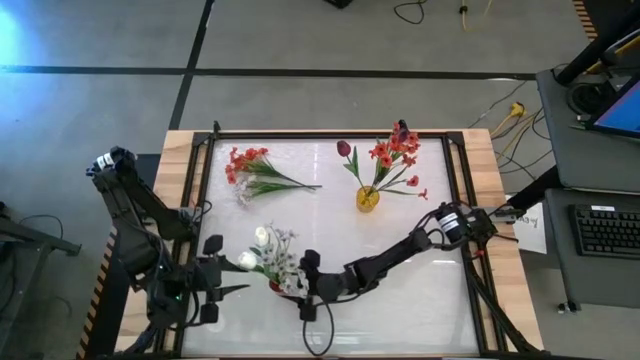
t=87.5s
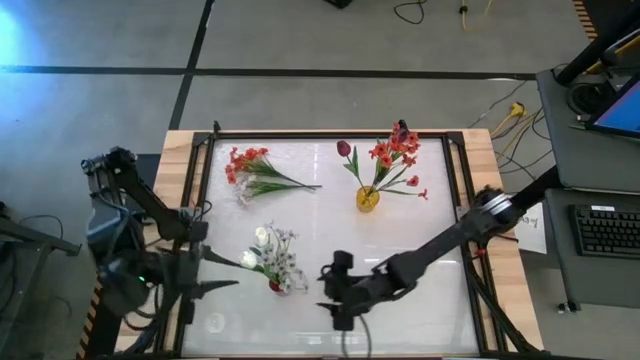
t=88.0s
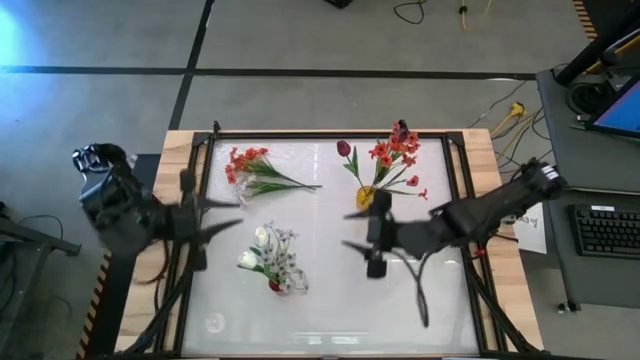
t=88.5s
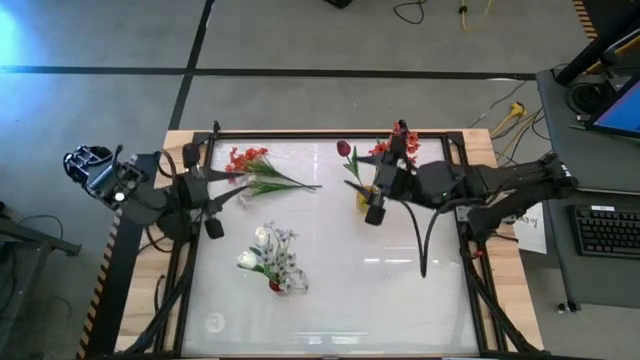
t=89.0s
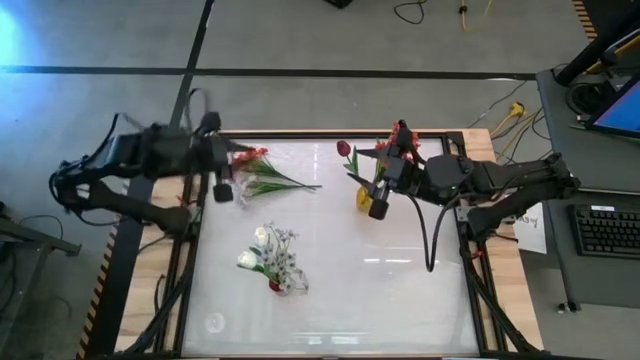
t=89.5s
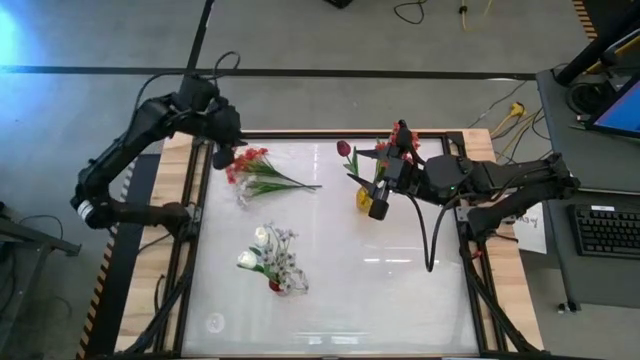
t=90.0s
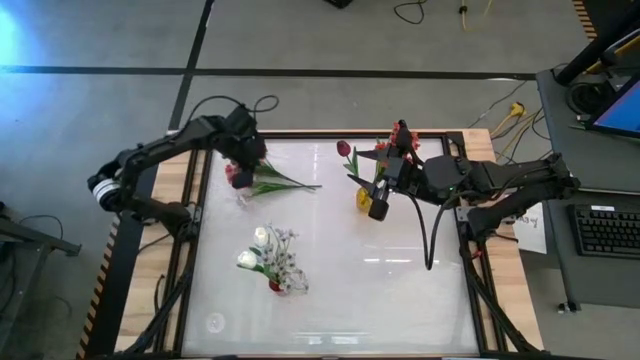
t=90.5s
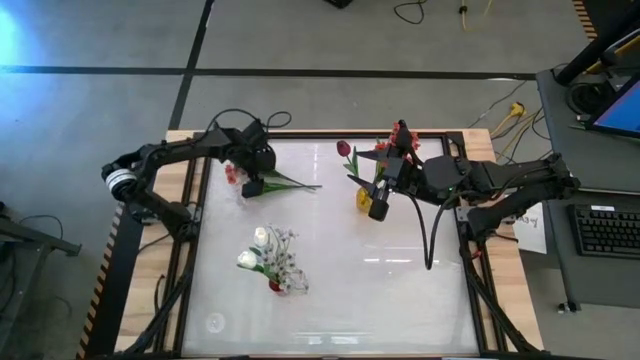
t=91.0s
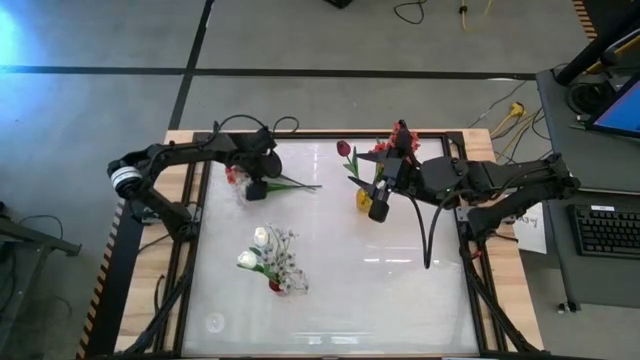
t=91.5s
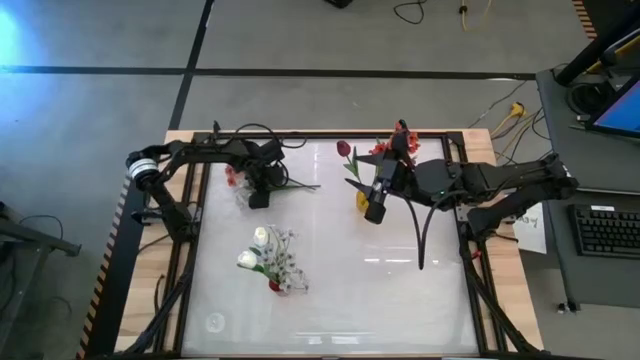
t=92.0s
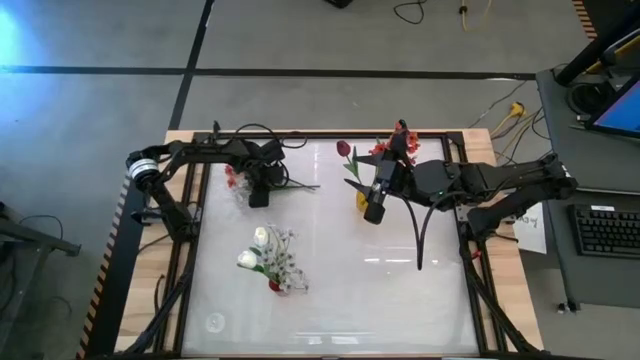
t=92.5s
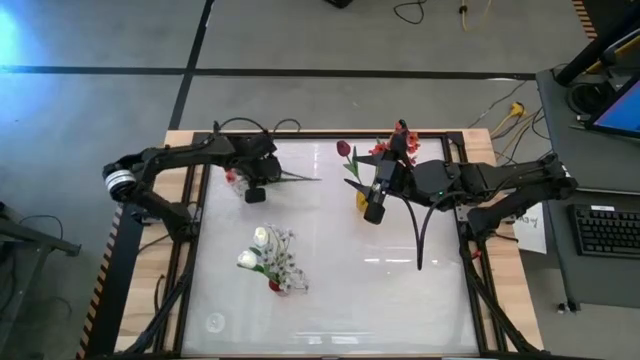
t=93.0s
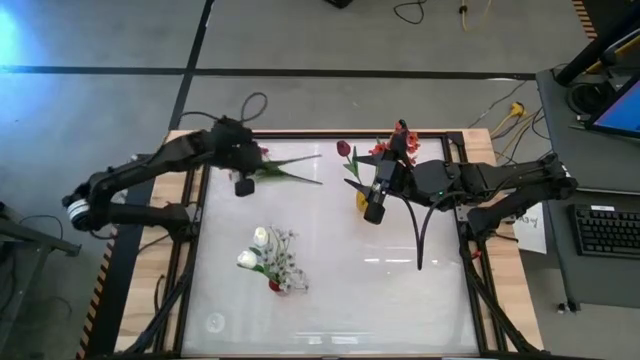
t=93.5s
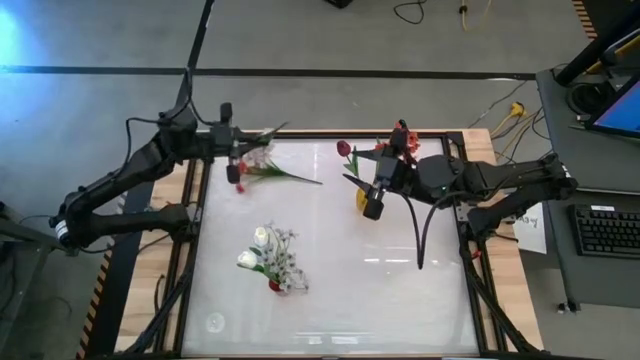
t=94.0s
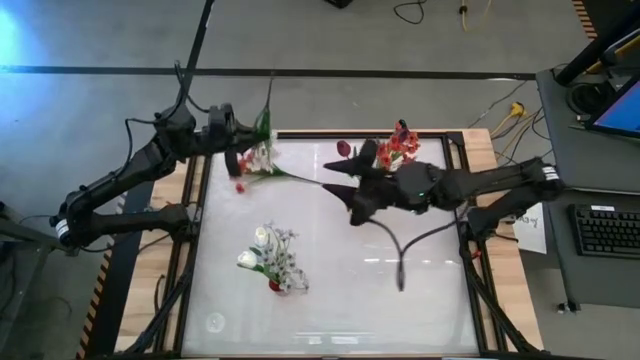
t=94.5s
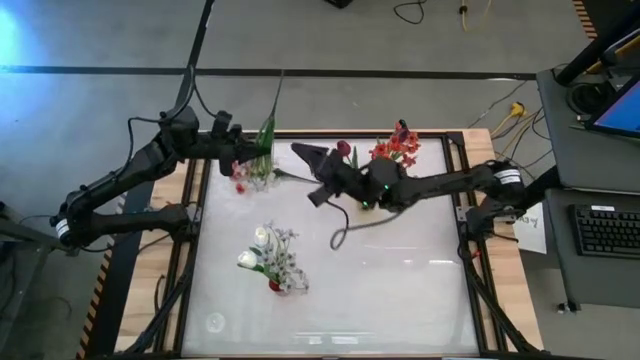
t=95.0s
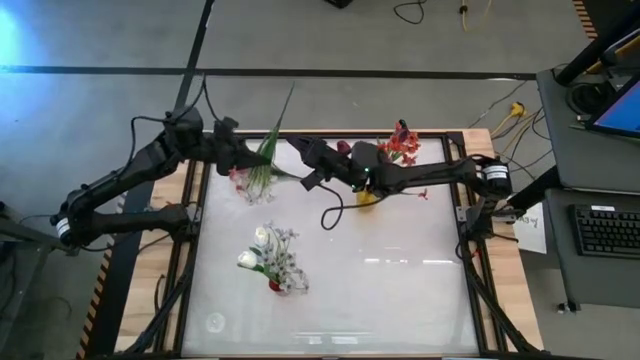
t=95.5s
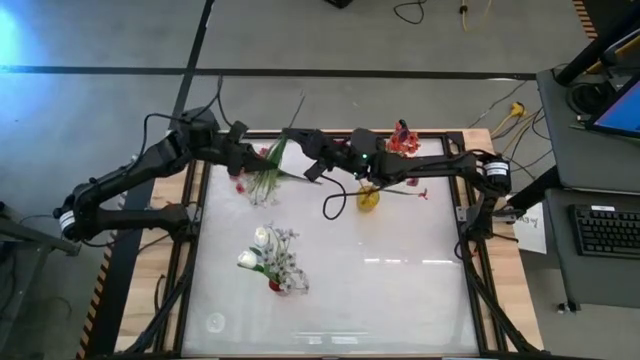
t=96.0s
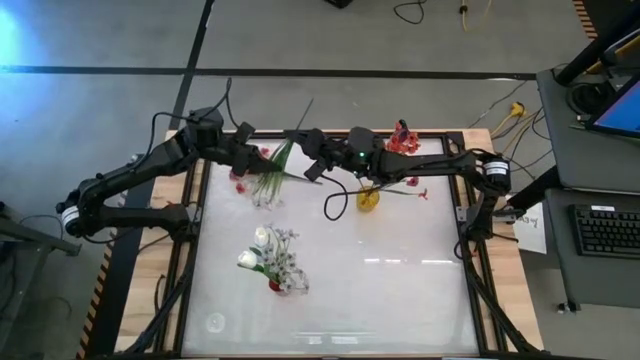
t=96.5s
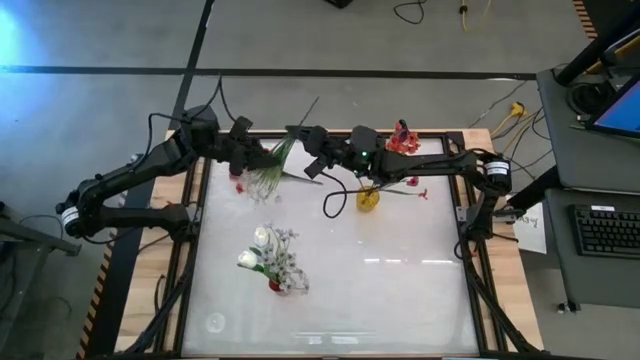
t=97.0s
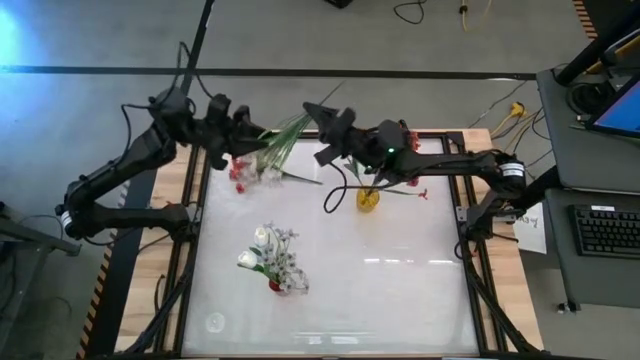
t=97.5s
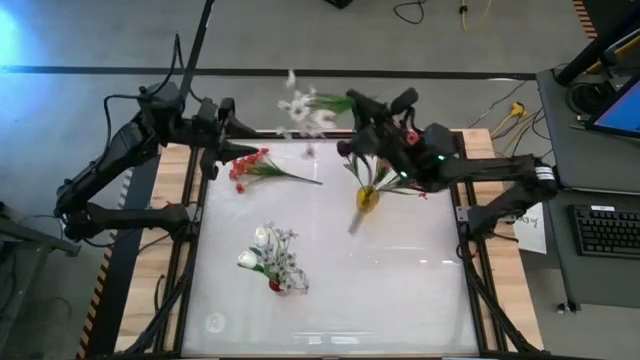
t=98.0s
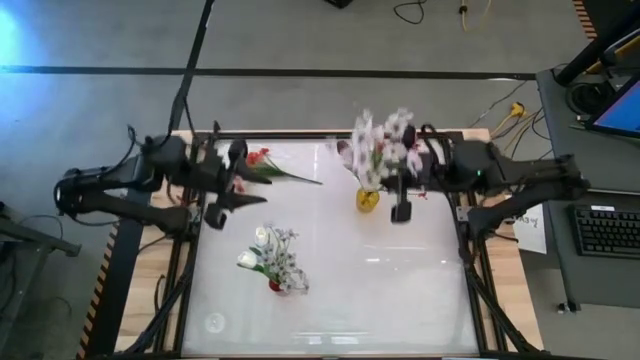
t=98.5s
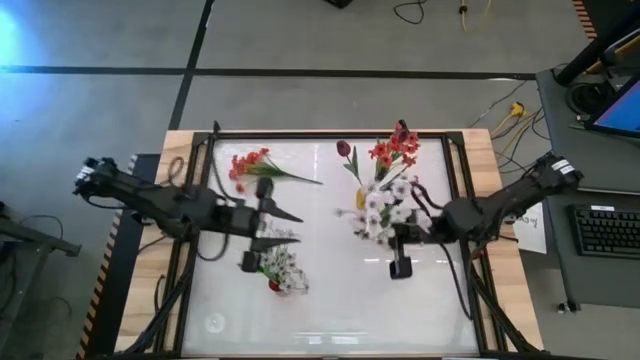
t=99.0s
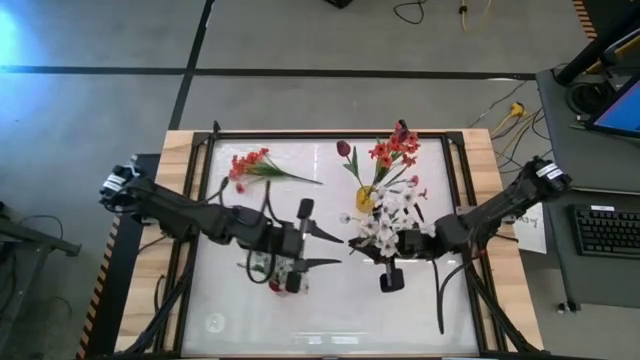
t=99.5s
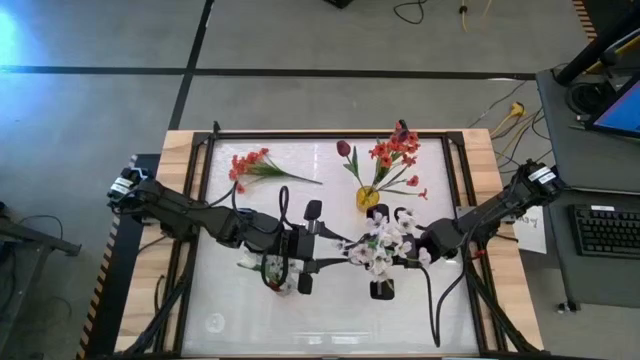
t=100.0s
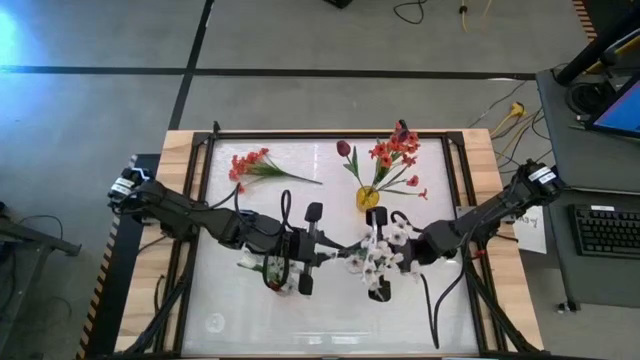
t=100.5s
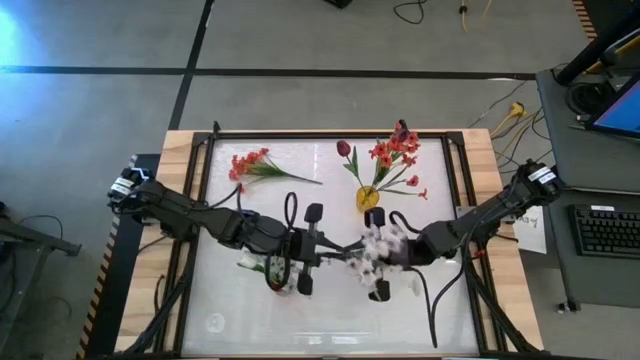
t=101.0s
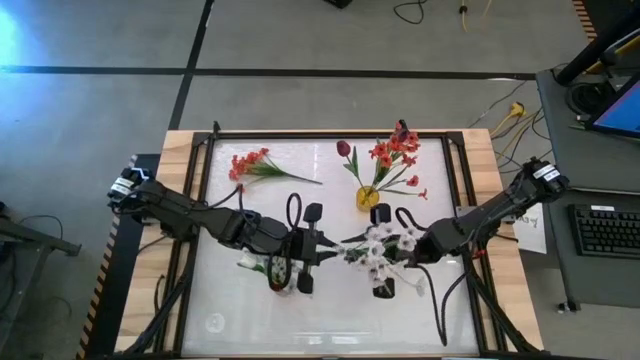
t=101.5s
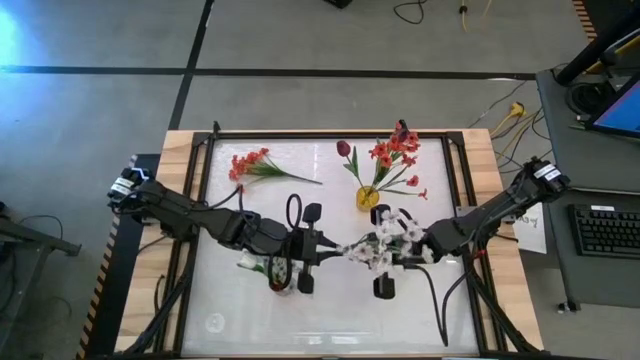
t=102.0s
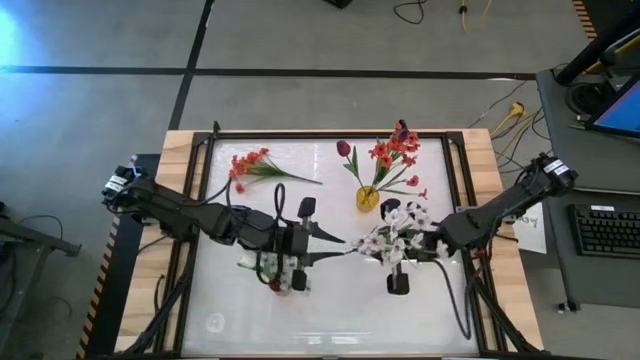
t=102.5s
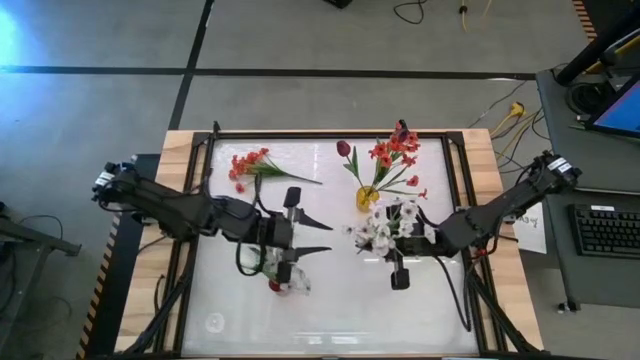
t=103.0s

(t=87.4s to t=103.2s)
Task: Sort flowers into vase by color
Put the white flowers into the red vase

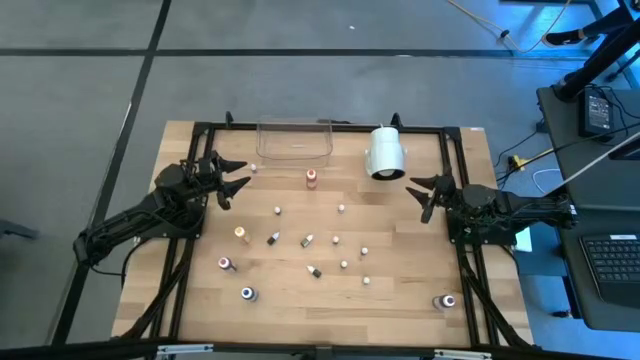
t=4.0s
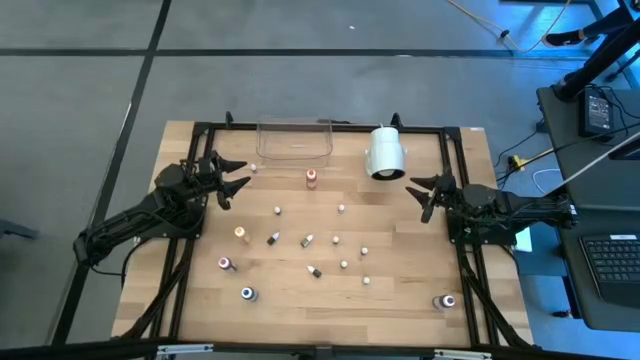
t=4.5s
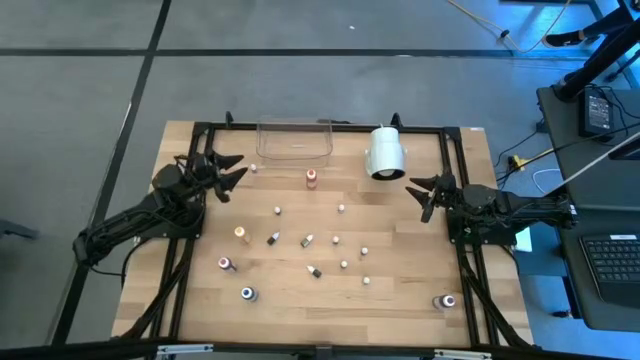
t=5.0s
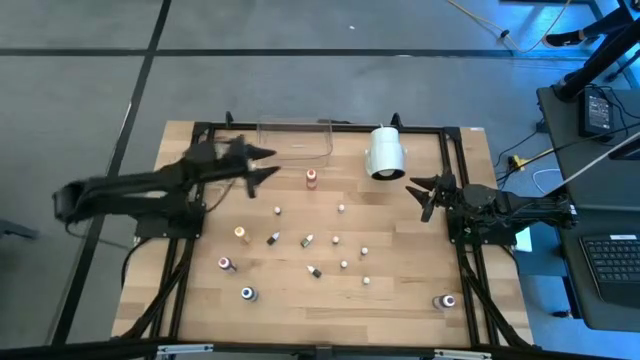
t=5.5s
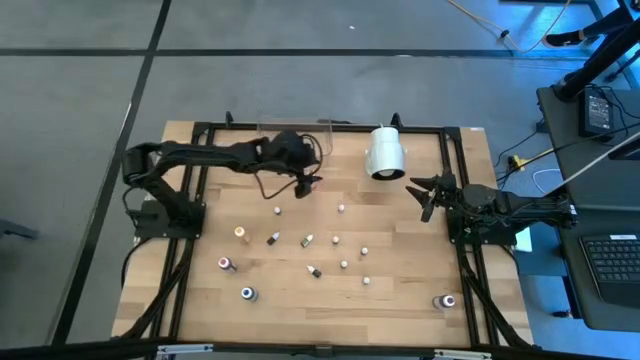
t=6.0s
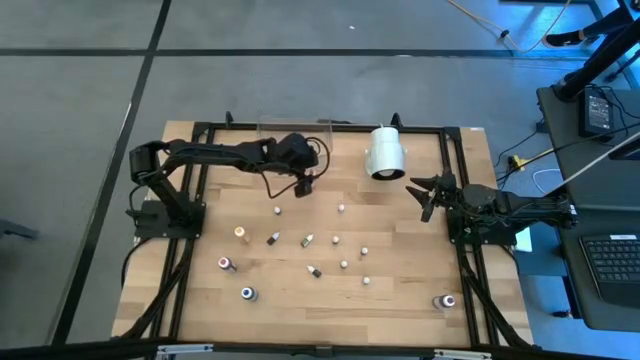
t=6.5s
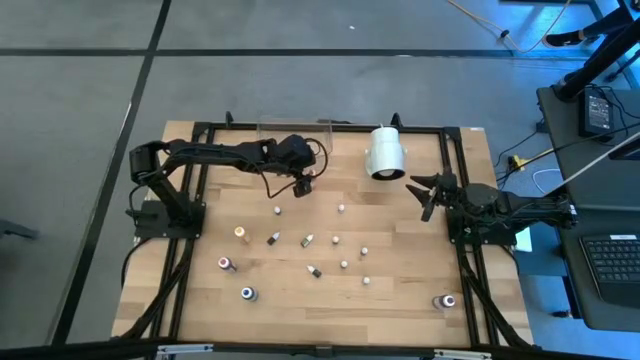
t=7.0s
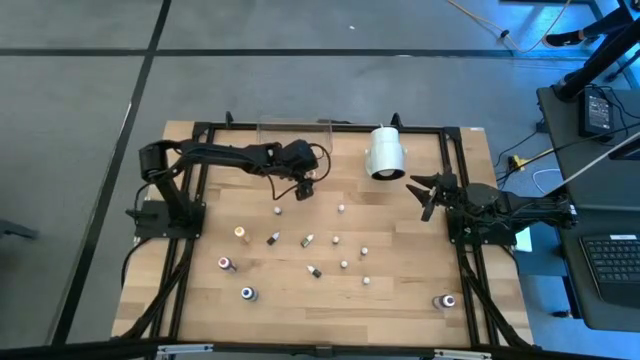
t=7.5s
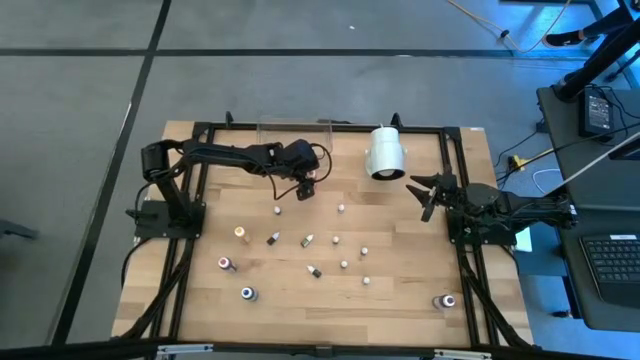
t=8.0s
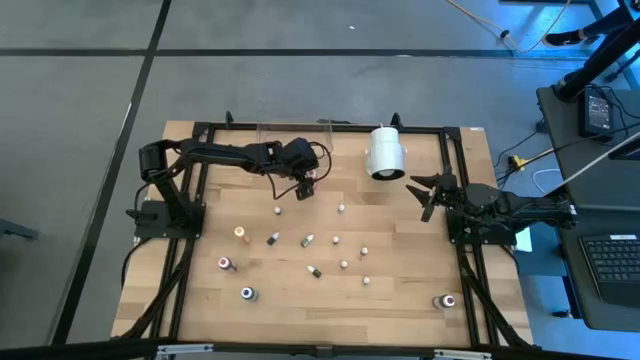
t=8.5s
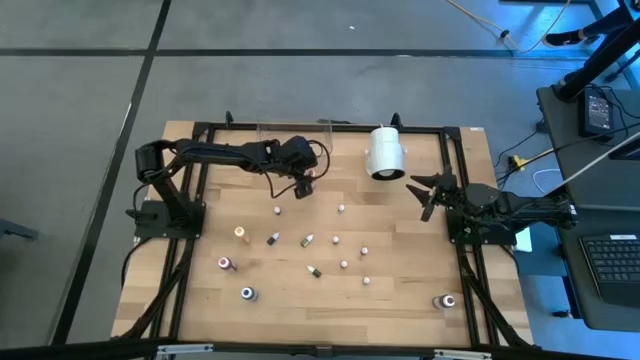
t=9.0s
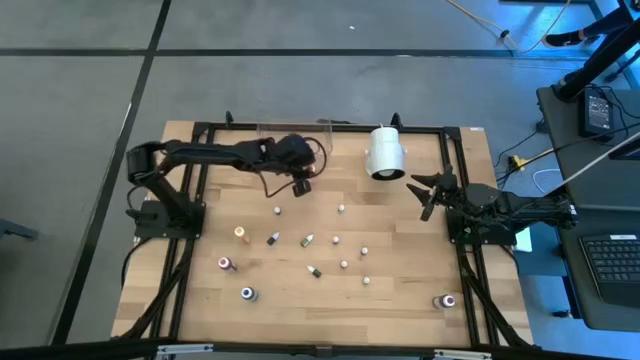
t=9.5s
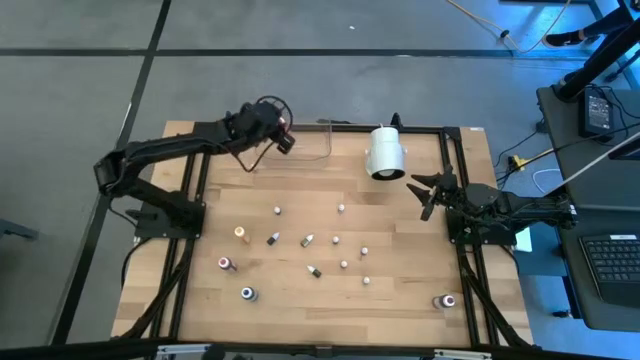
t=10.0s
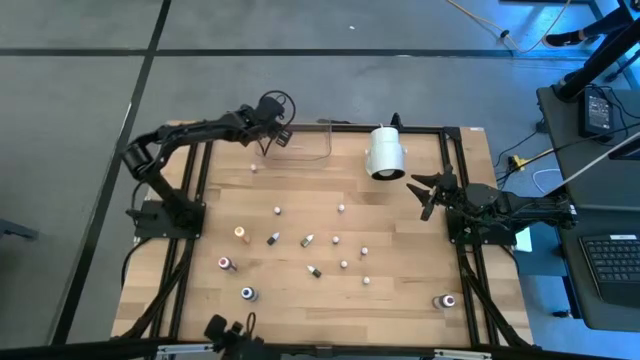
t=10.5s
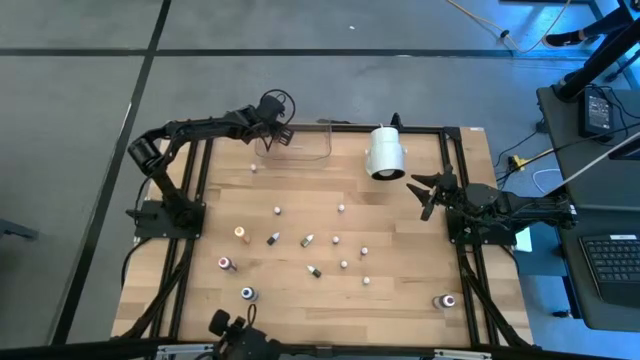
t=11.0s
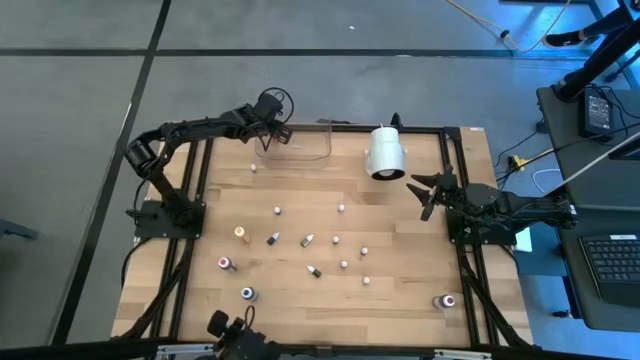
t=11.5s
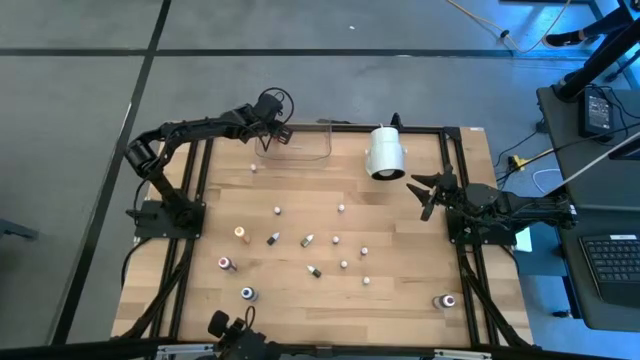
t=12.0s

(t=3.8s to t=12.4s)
Task: Pick & Place food coloring
Put the orange food coloring bottle into the transparent bin
